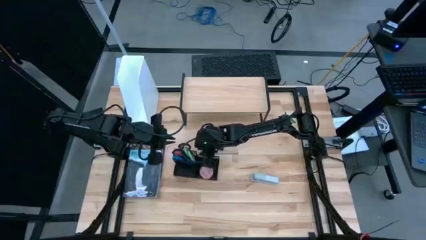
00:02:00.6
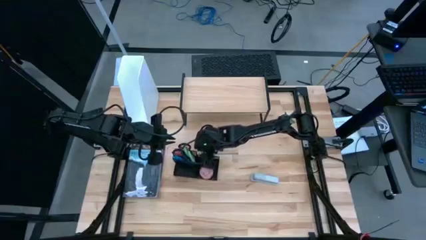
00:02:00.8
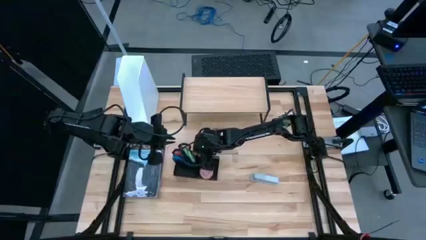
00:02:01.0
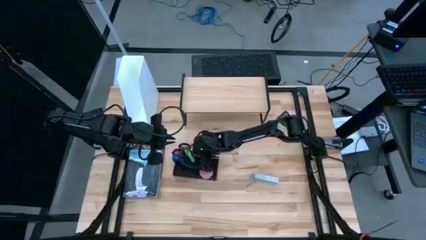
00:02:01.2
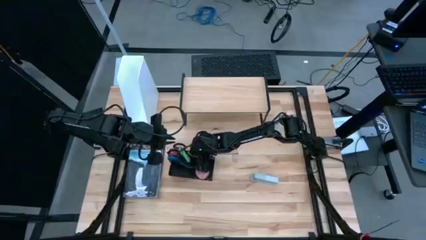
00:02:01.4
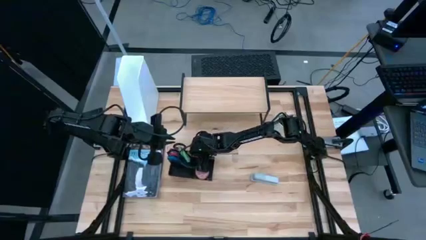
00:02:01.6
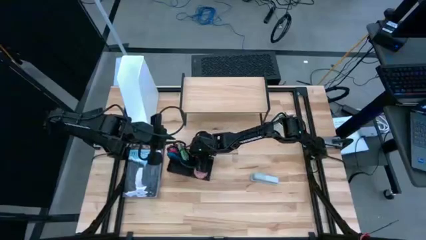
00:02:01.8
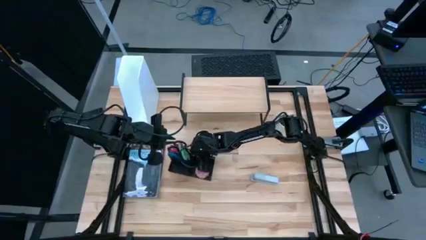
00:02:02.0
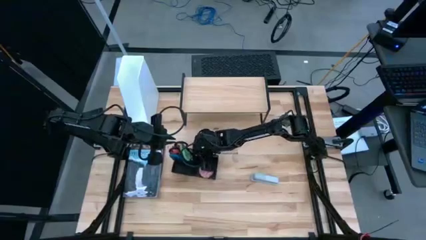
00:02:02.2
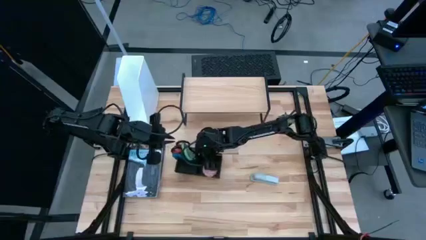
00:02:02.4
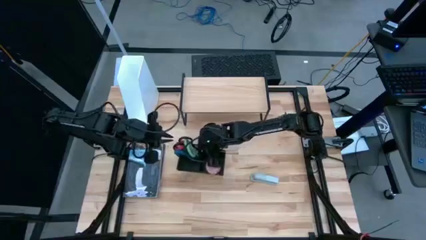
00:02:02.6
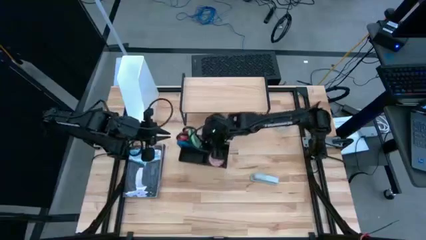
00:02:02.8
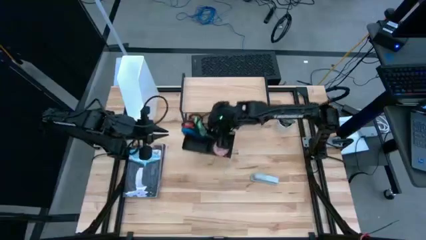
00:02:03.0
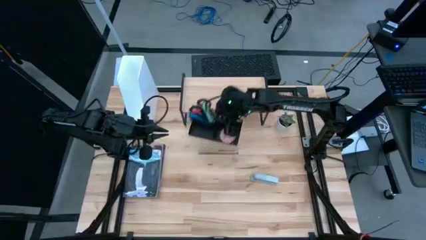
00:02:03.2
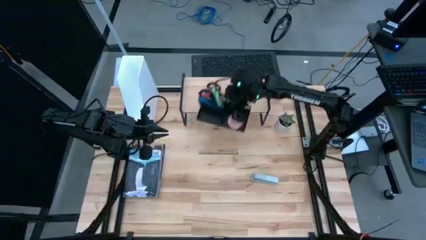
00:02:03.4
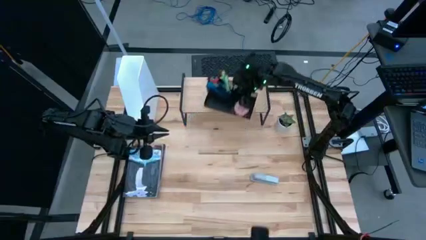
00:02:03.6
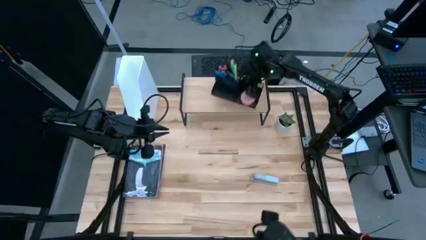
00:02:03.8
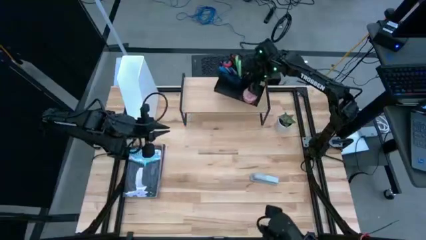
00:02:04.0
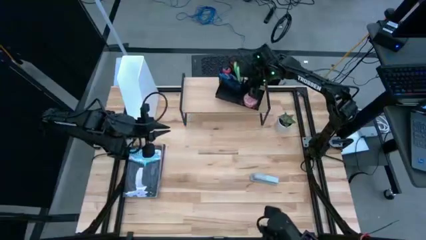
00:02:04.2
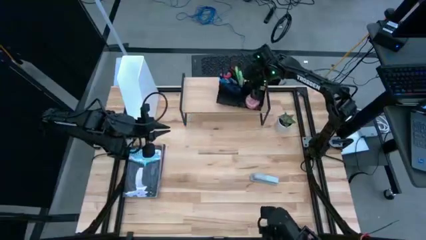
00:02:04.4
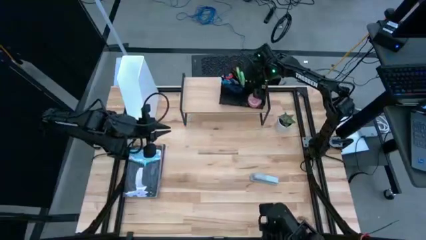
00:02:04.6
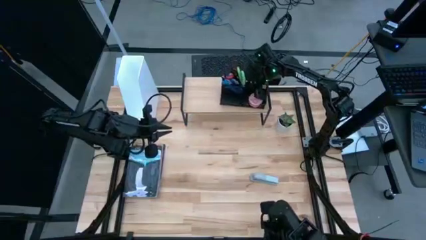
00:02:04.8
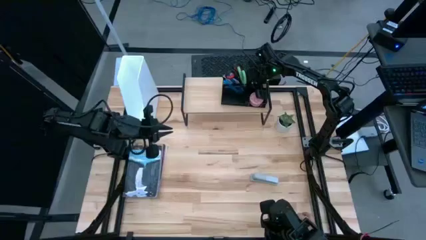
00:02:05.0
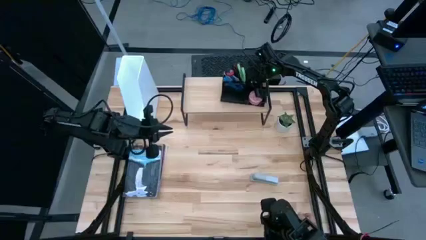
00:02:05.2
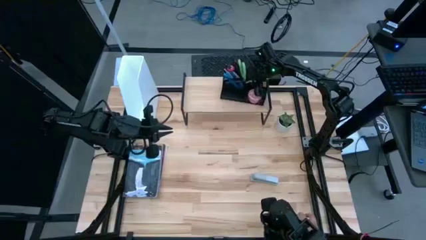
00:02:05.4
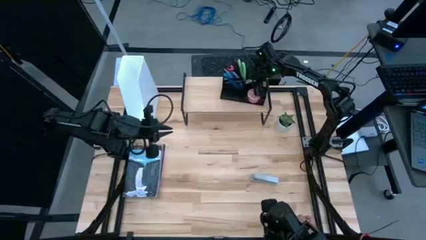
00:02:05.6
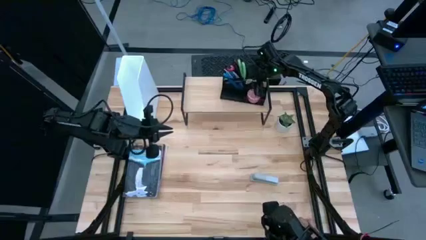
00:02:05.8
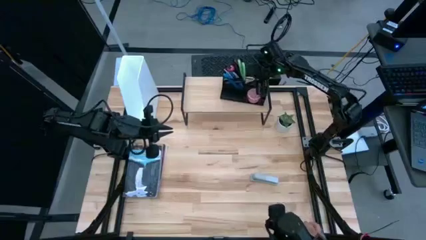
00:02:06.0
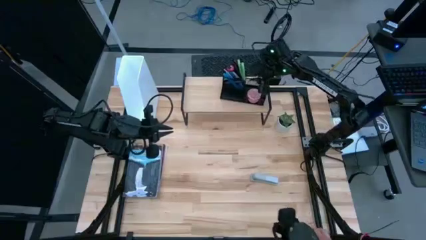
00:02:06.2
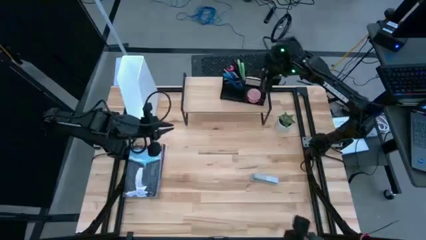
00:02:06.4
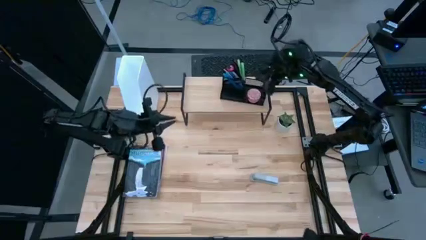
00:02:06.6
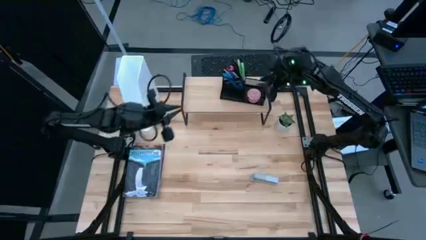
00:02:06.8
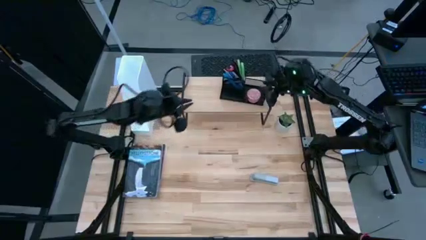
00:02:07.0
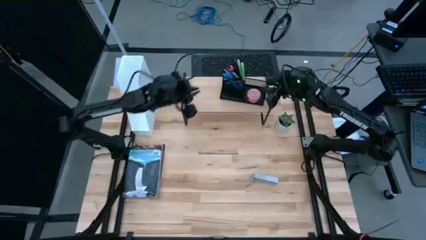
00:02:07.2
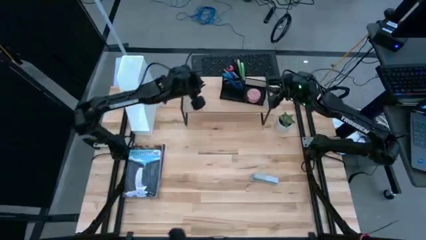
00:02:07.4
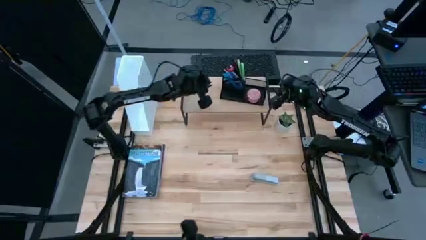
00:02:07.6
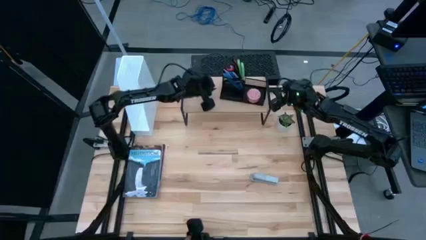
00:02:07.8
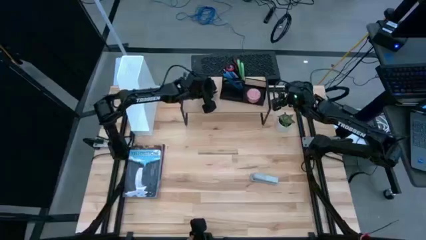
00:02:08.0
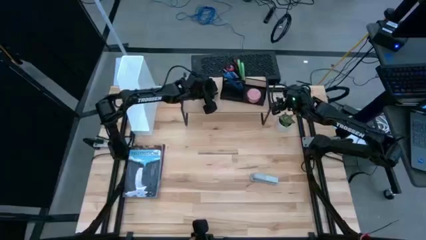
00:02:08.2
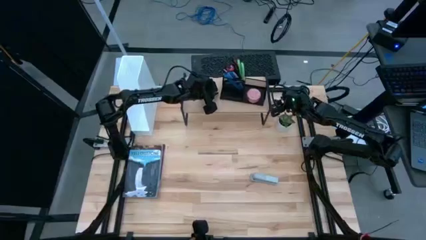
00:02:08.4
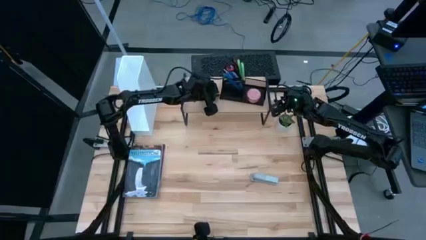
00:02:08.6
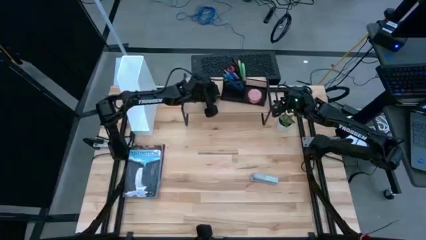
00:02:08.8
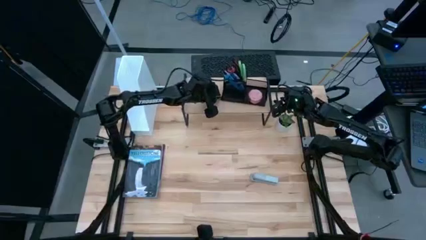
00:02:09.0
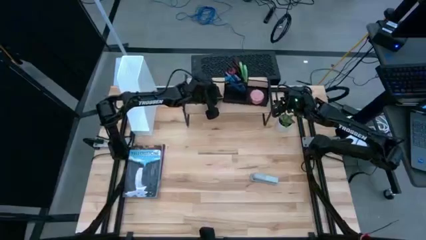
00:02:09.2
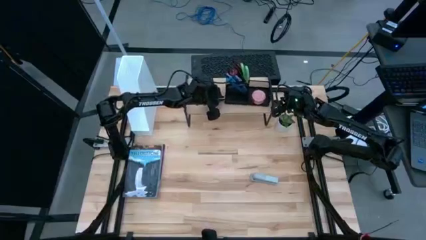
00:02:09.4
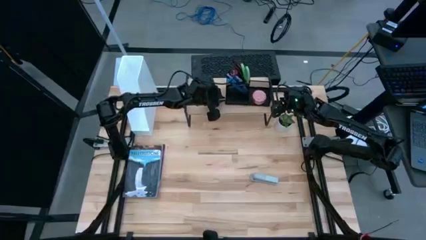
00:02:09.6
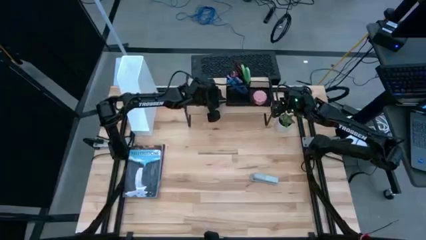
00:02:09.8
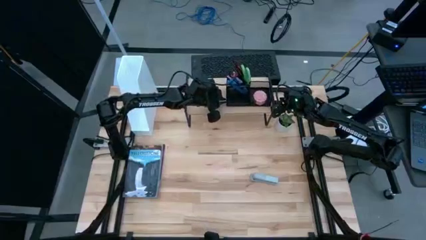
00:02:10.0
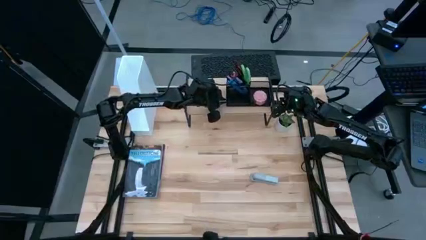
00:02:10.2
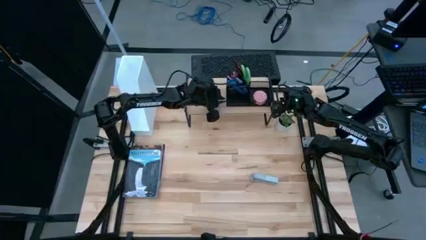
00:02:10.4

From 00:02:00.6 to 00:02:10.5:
Task: Stock shelves
Put the desk organizer on the shelf

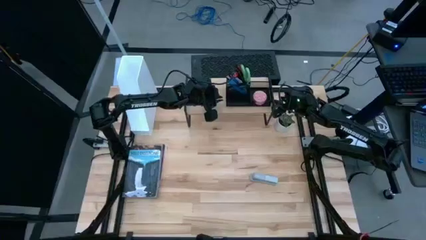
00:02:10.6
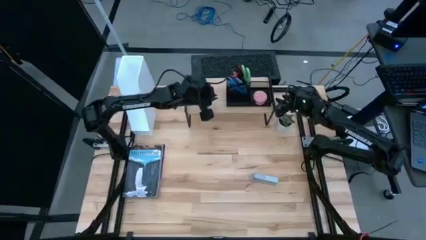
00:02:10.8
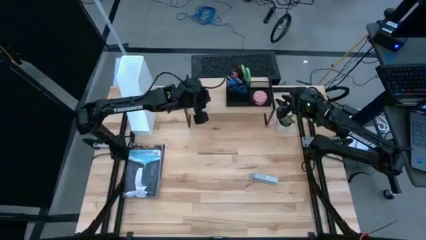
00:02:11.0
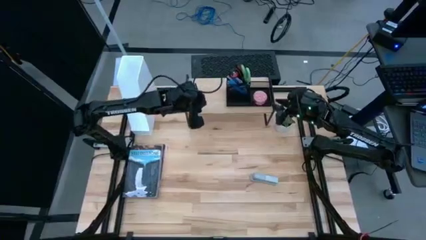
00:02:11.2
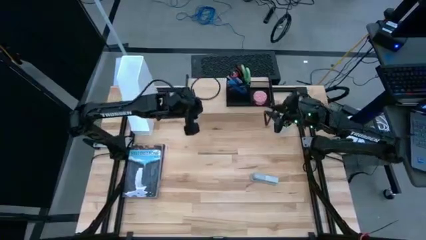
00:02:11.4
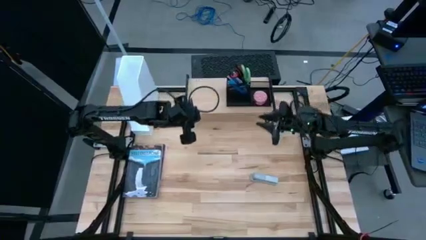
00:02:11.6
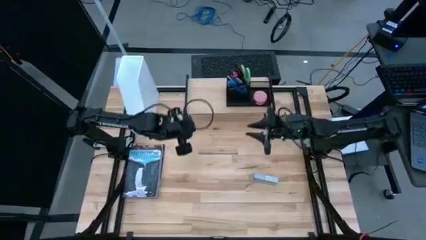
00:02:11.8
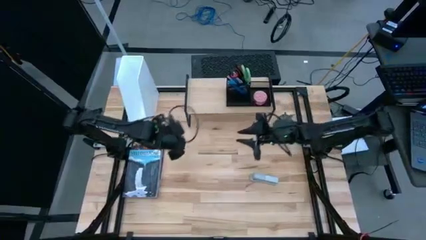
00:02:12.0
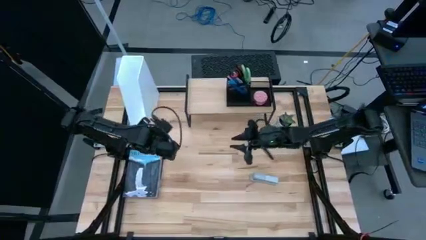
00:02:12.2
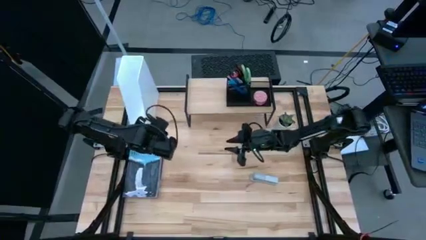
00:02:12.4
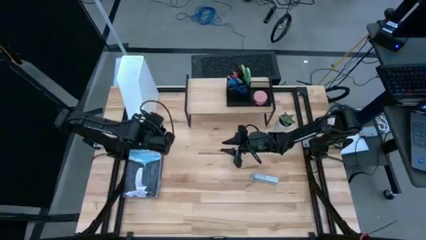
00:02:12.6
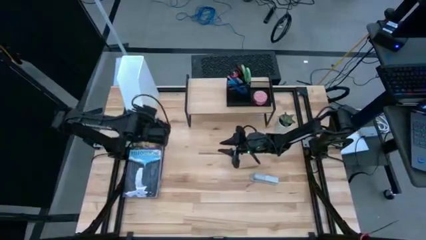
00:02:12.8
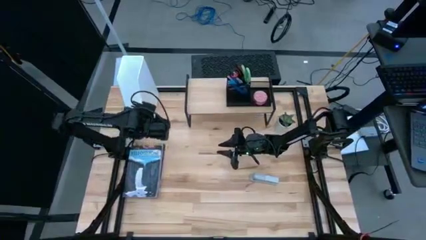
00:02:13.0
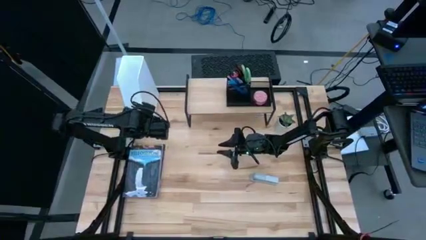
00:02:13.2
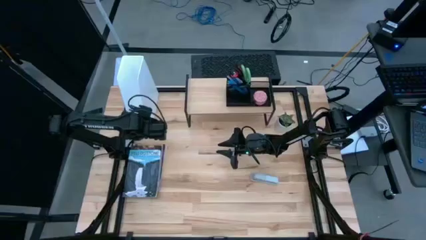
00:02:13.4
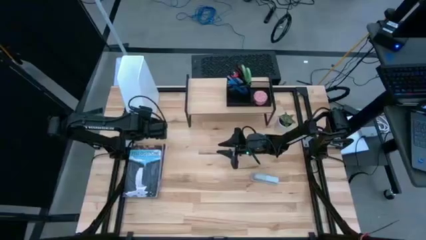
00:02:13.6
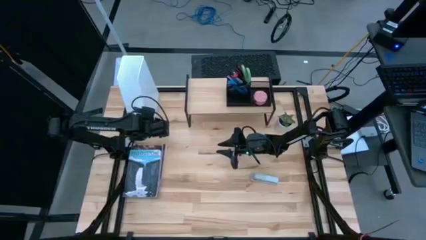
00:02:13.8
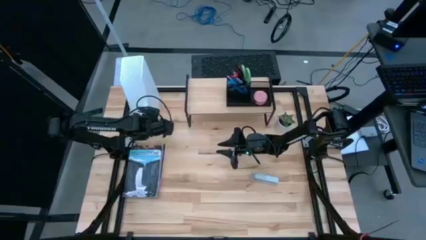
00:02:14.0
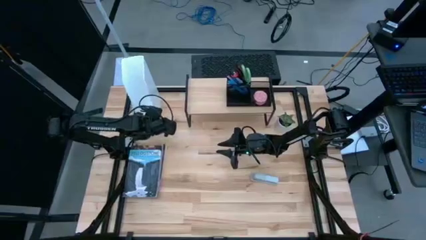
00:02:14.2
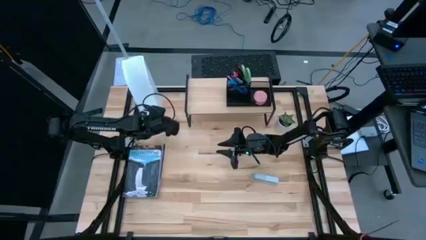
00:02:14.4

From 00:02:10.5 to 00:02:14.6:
Adjust the bookshelf

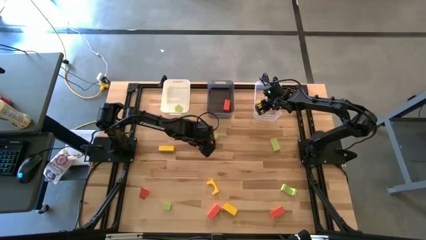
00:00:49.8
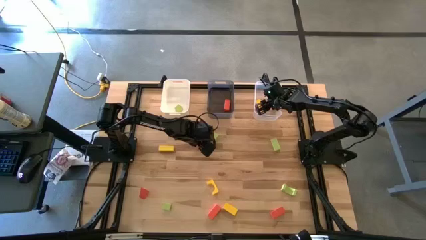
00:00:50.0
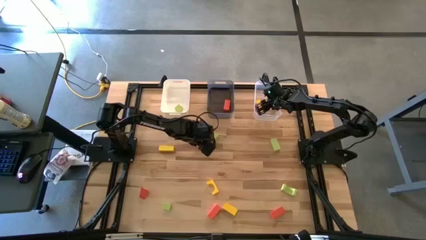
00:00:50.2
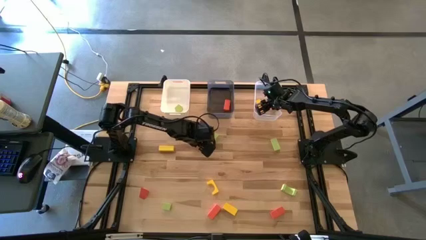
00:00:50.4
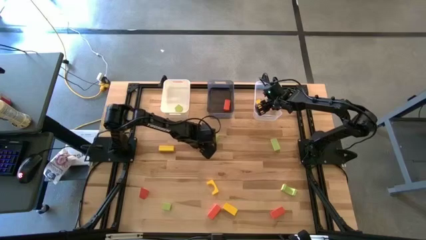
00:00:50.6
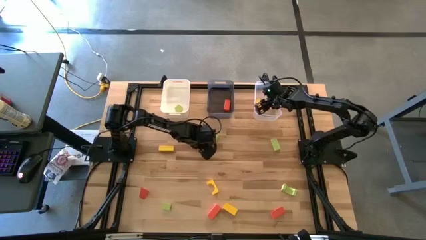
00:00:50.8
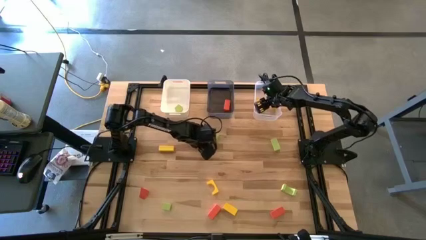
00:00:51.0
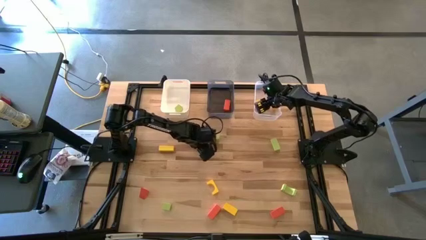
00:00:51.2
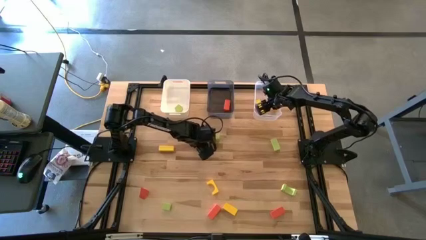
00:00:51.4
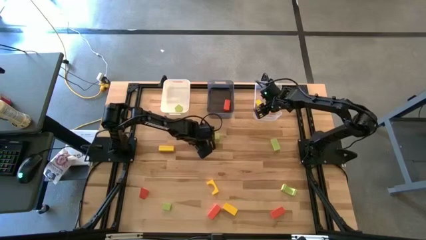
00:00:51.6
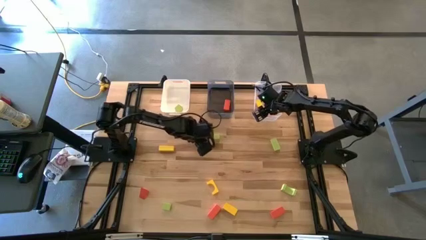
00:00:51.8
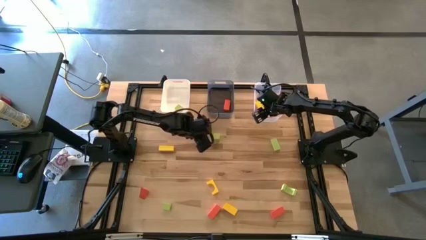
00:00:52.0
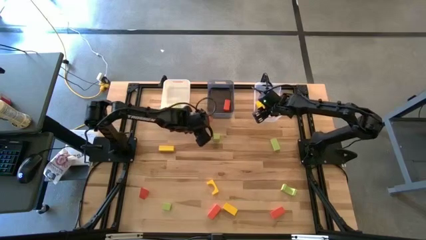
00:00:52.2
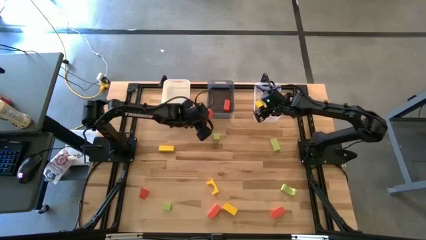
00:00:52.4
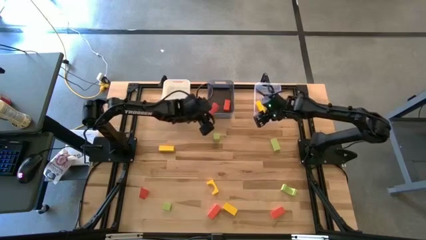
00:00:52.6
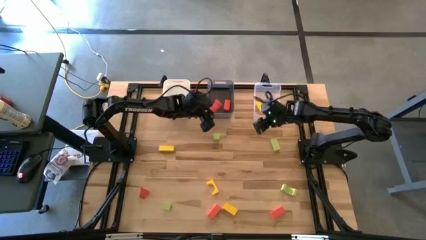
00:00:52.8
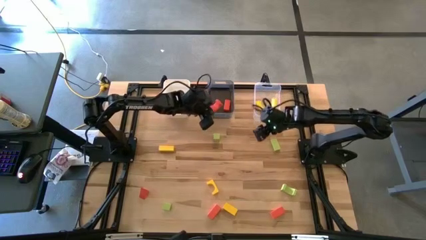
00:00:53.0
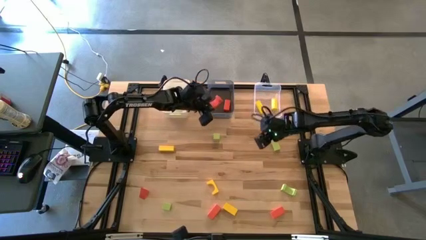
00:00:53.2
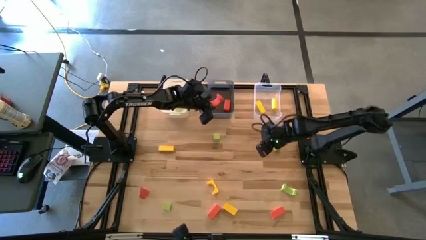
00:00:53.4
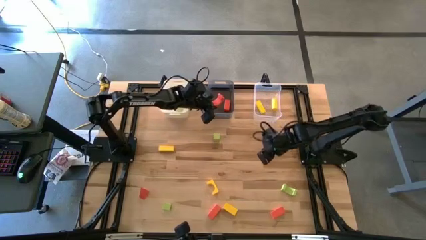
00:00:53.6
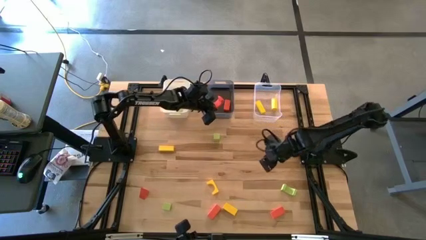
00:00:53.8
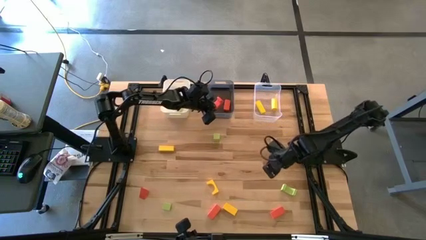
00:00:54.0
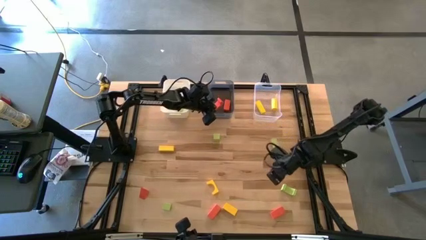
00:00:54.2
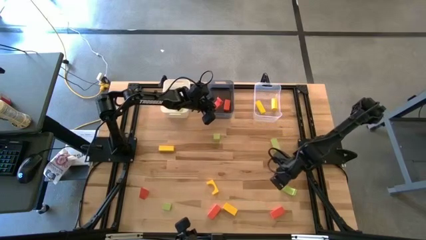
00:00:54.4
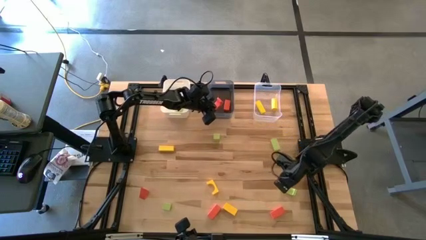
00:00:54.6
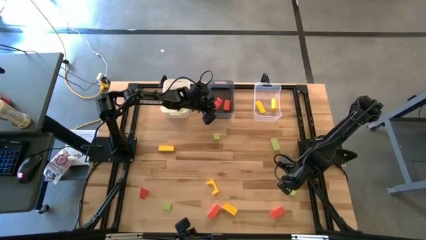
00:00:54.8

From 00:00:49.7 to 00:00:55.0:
Task: Sort & place blocks by color
Put the orange block into the black bin
